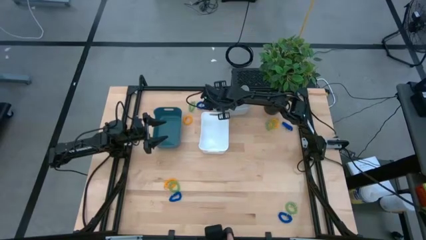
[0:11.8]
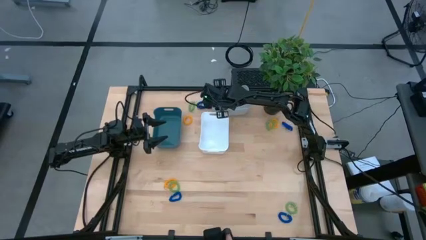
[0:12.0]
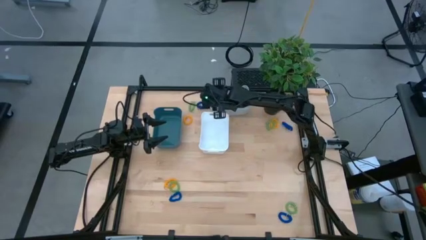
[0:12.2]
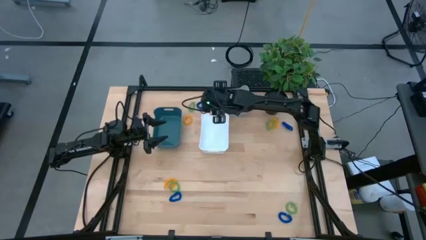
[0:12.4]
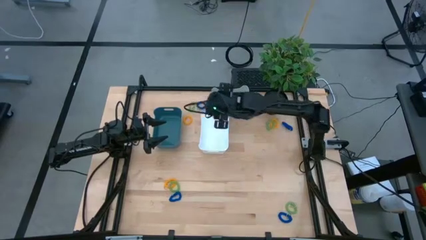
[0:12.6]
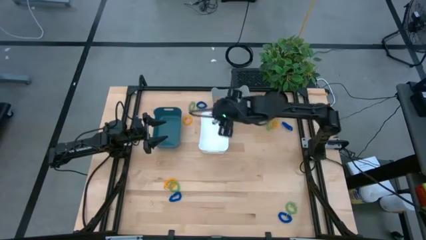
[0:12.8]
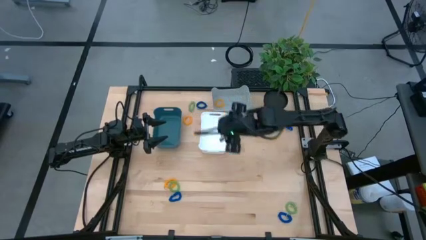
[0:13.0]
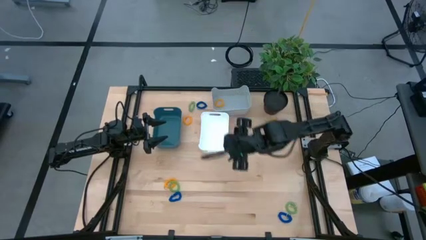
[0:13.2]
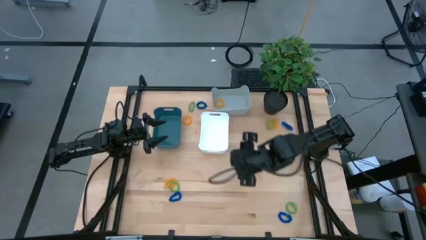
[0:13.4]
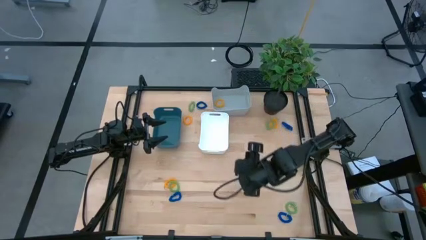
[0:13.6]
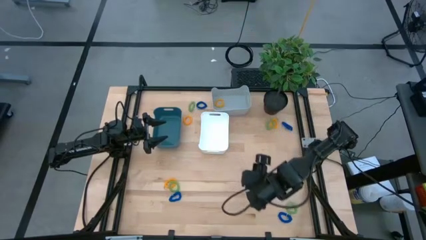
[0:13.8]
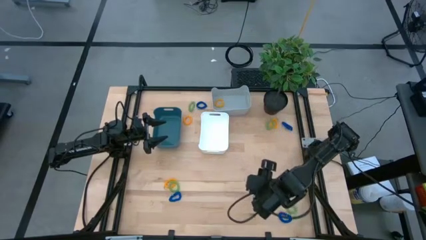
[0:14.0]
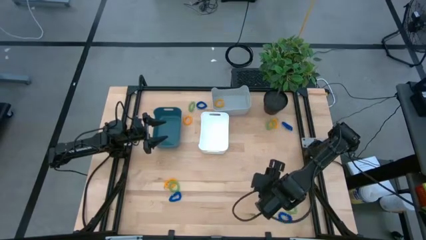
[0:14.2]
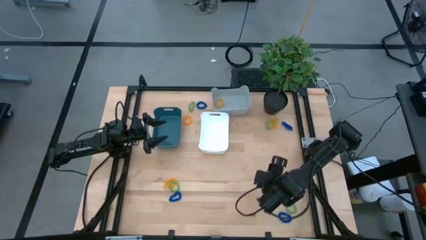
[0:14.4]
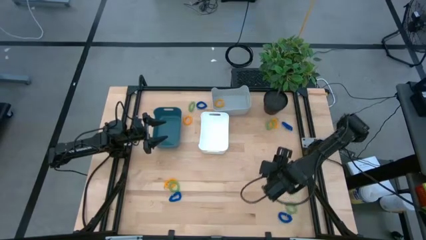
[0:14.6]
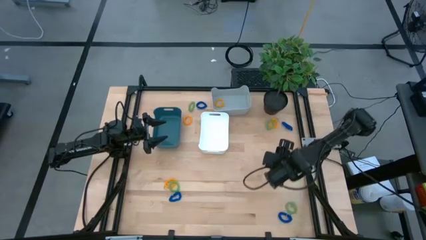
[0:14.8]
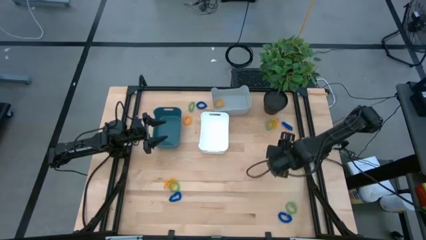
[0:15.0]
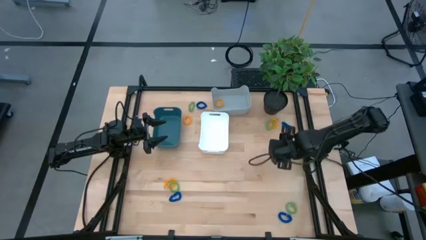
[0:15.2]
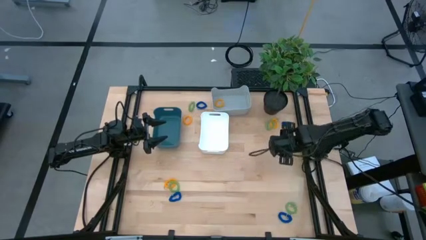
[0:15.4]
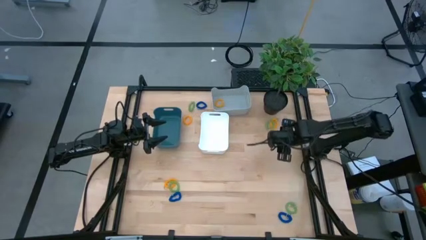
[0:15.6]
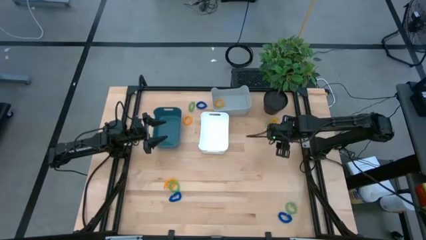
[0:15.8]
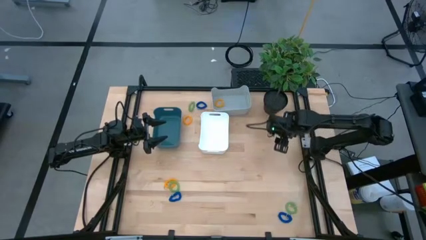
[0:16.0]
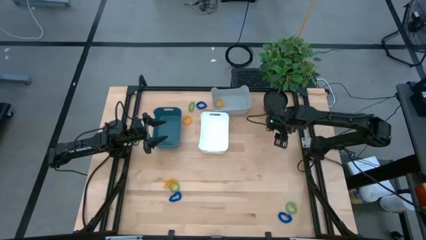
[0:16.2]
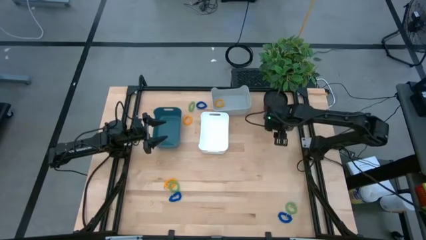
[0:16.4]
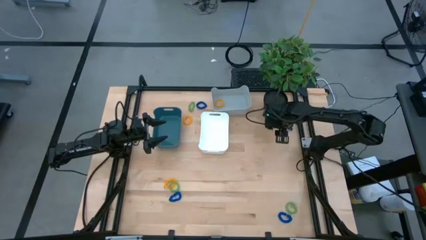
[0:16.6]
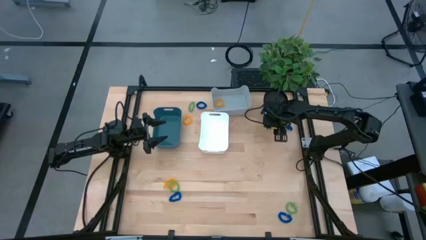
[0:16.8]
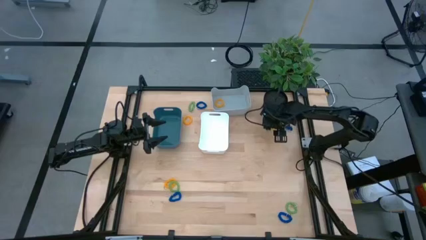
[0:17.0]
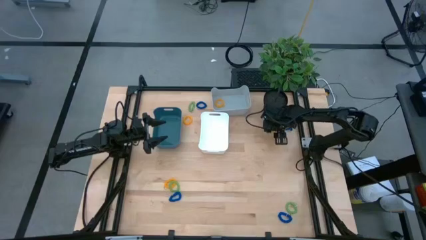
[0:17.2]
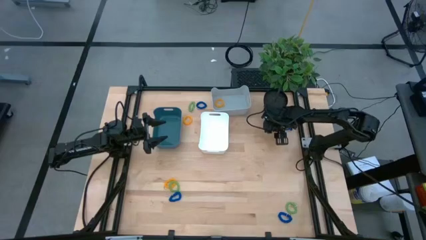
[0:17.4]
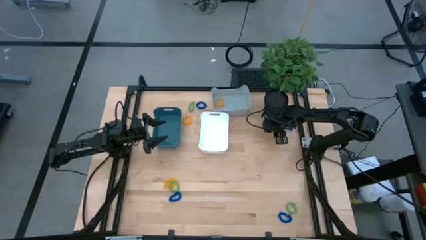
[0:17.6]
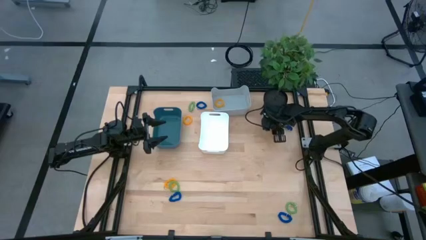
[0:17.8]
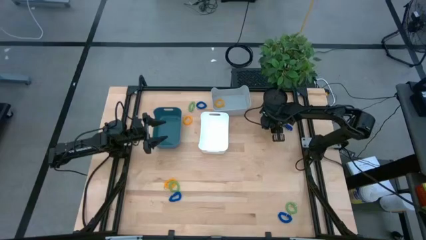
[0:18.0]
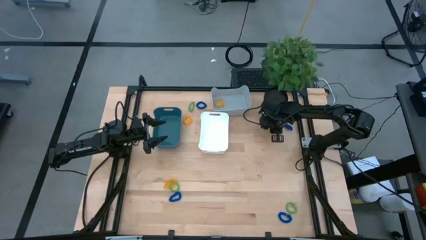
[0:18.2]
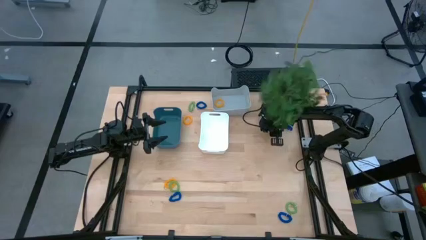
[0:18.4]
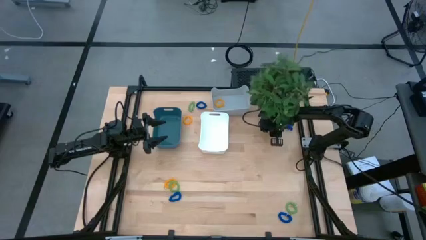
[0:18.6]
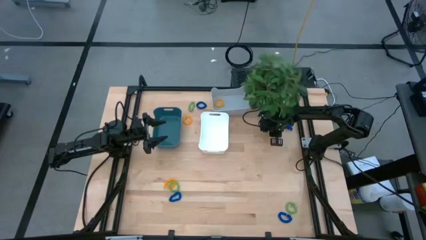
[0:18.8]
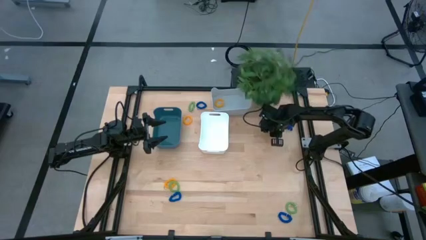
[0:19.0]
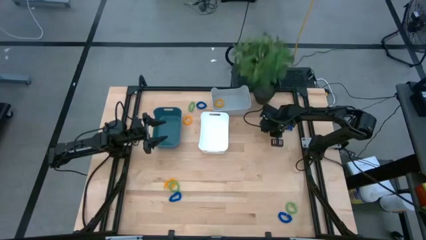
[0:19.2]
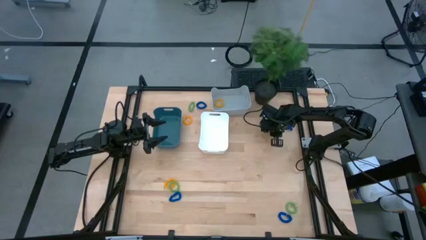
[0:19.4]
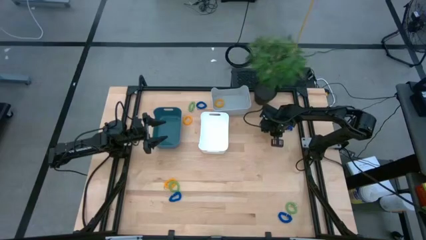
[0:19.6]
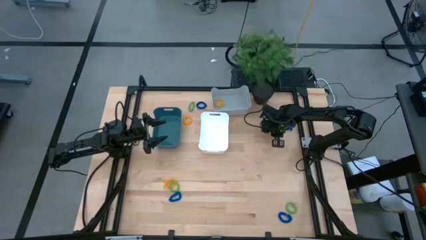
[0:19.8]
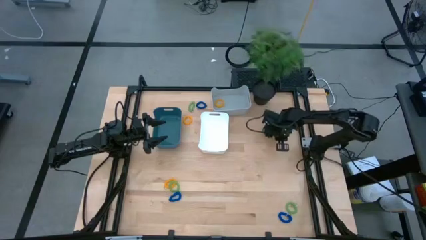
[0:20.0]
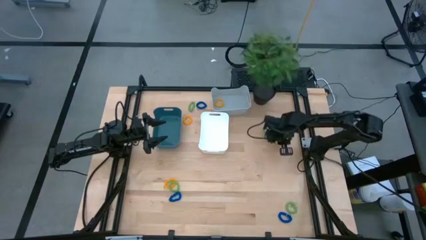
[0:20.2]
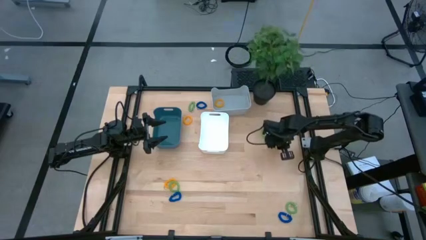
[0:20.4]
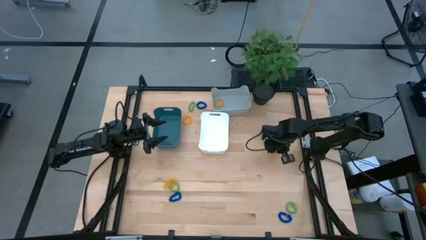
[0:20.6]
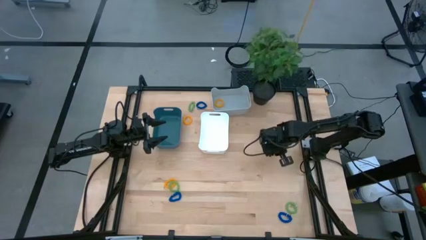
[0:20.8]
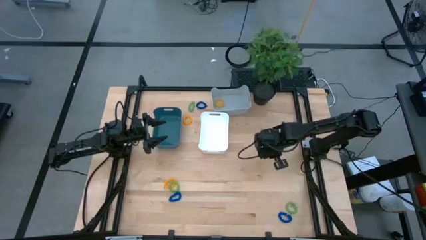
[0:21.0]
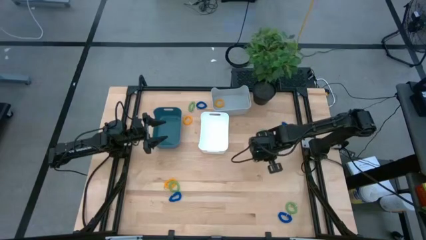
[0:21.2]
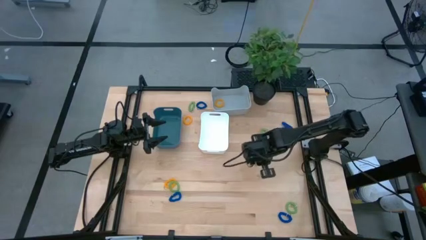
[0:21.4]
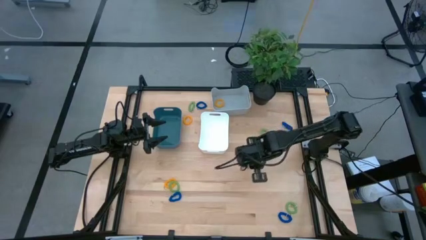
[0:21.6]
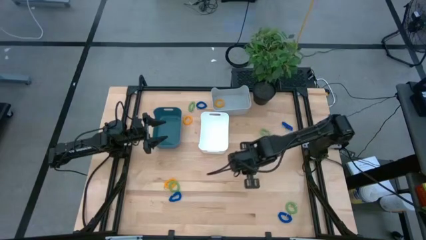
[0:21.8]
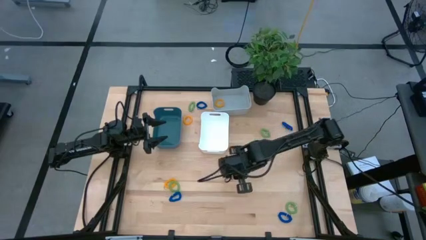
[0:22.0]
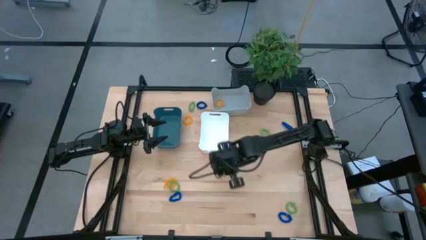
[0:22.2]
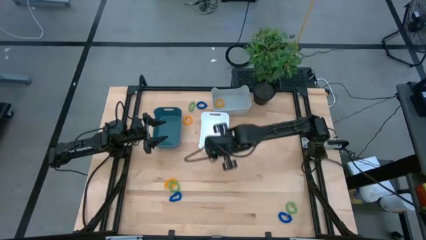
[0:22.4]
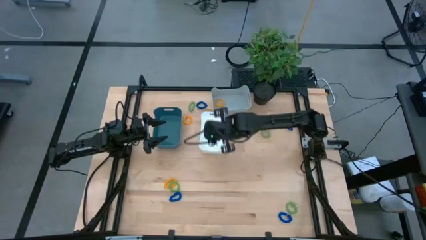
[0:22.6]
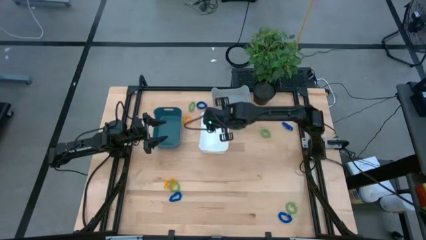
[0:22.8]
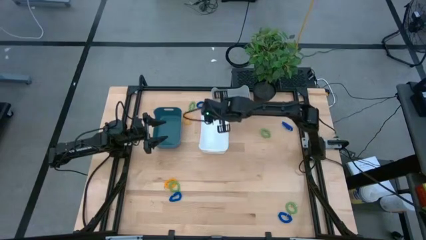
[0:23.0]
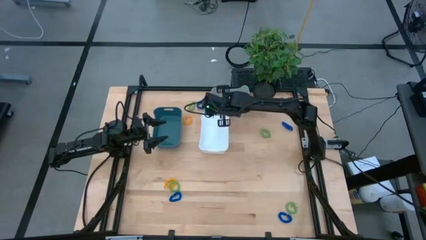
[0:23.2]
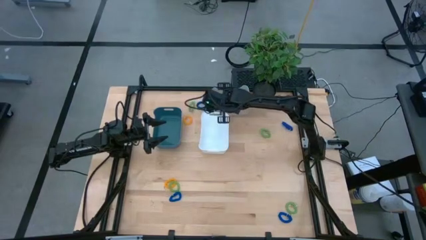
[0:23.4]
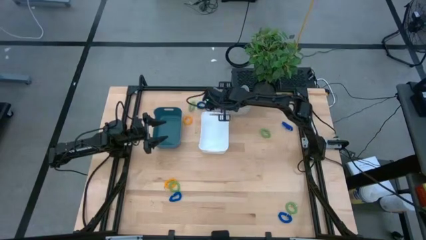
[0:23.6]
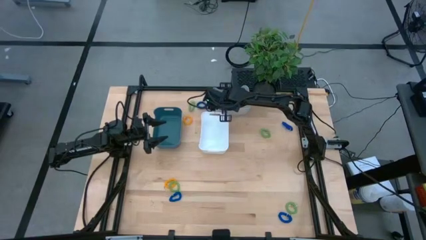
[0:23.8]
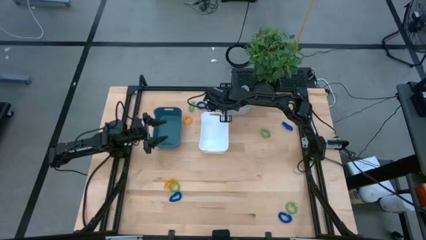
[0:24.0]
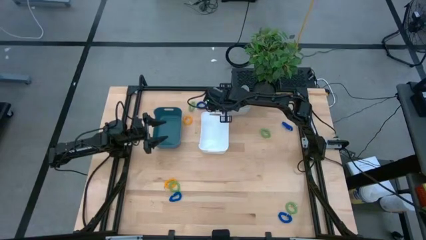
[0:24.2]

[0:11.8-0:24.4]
Task: Sort spring keychains
Put the yellow spring keychain into the gray bin
